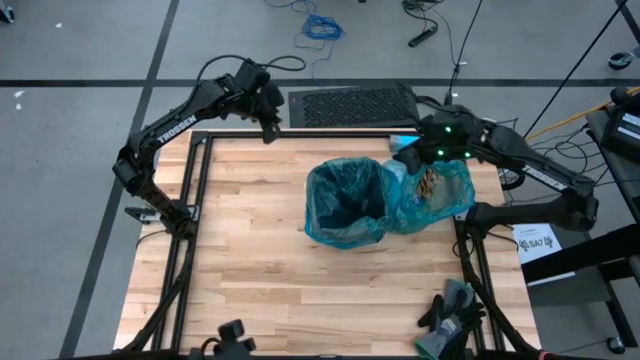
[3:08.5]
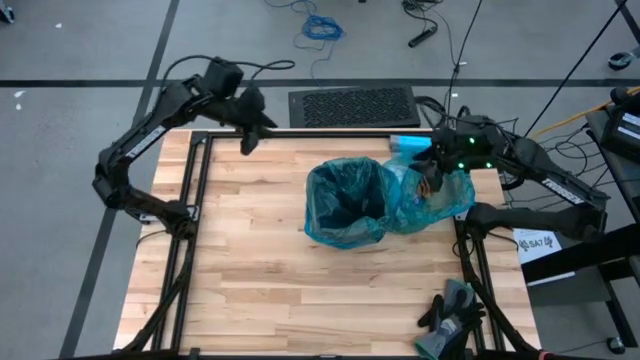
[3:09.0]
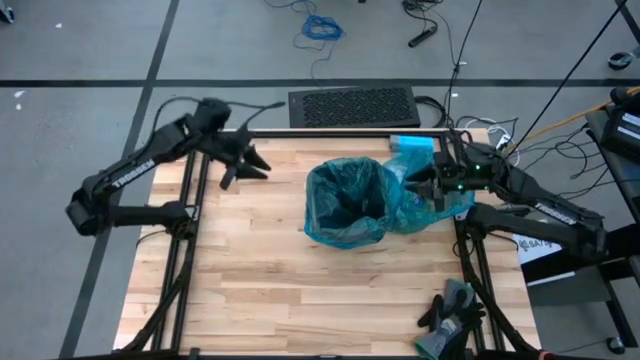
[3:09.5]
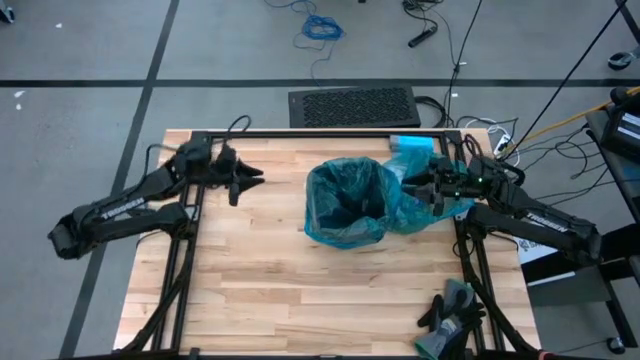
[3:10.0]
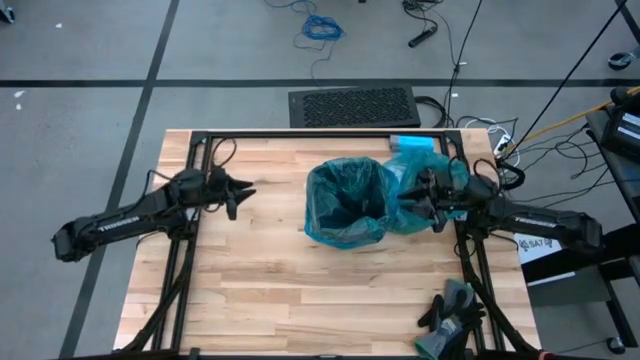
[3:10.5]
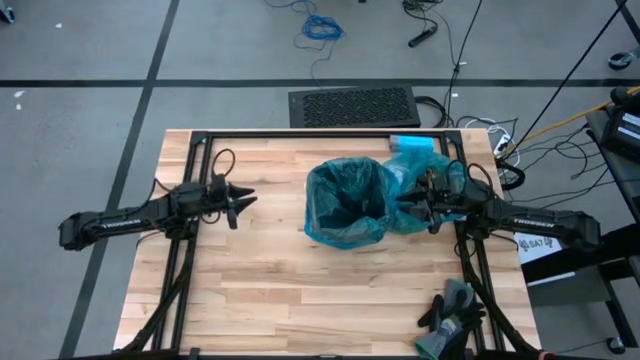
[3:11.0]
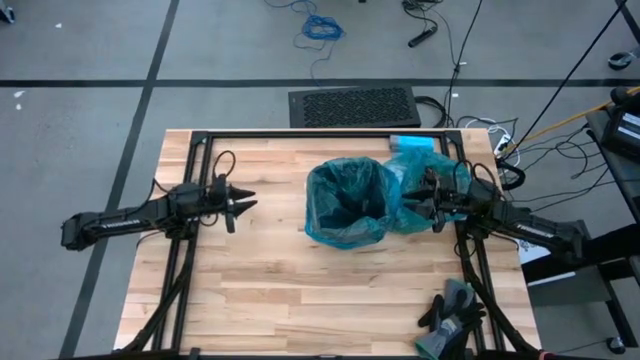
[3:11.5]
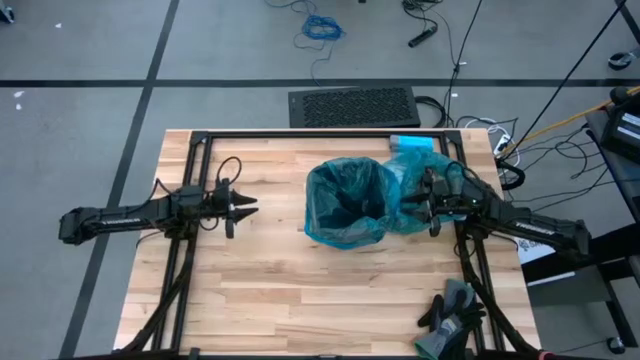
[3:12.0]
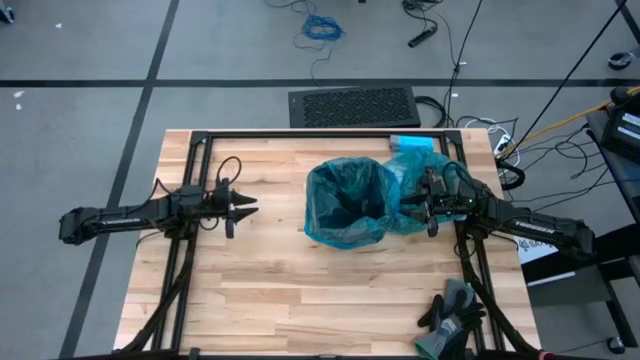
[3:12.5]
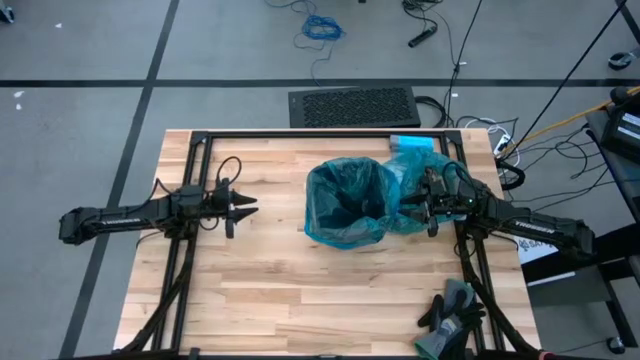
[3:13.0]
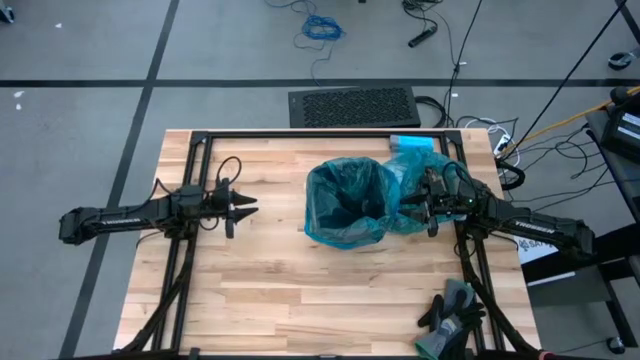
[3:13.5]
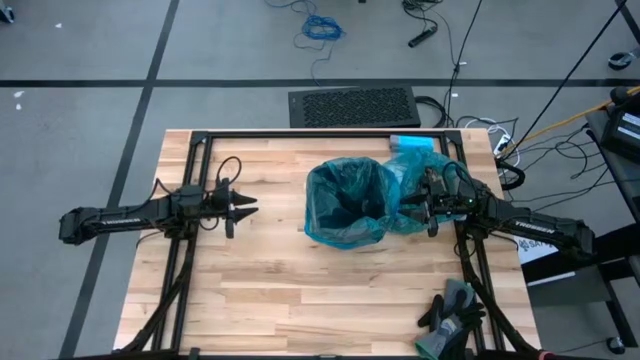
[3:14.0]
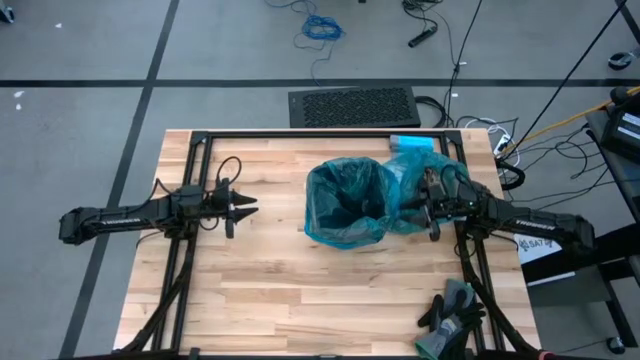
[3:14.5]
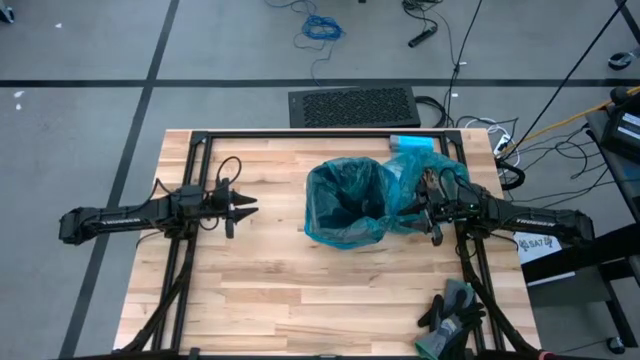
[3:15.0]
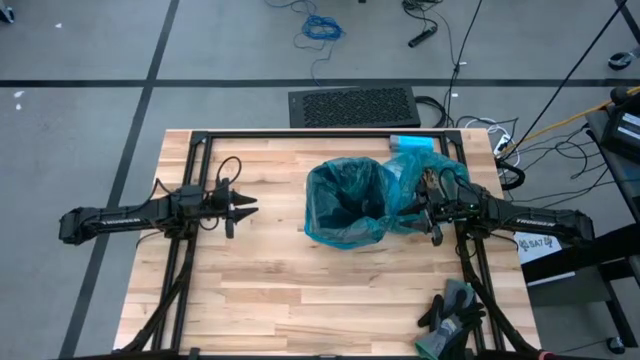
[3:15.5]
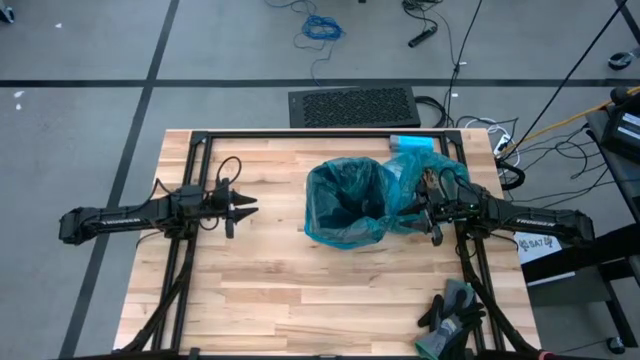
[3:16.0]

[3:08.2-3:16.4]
Task: place trash/remove bag and relplace
Return to Home Position

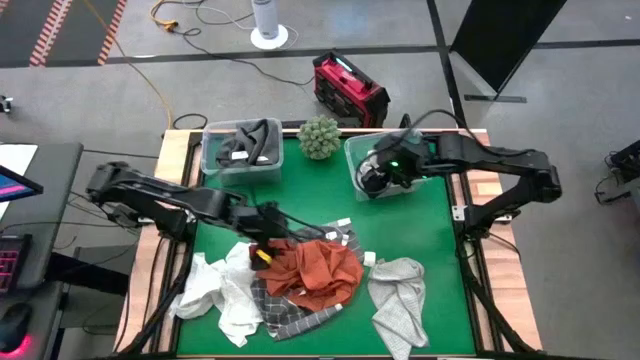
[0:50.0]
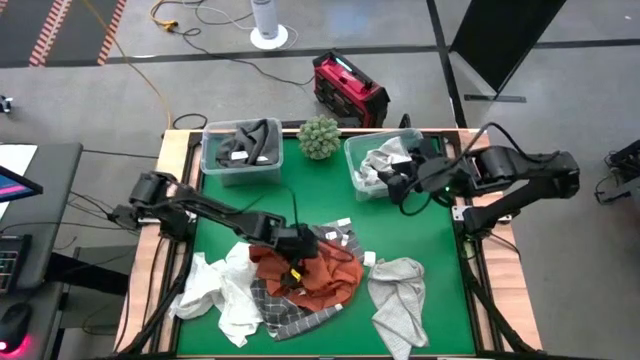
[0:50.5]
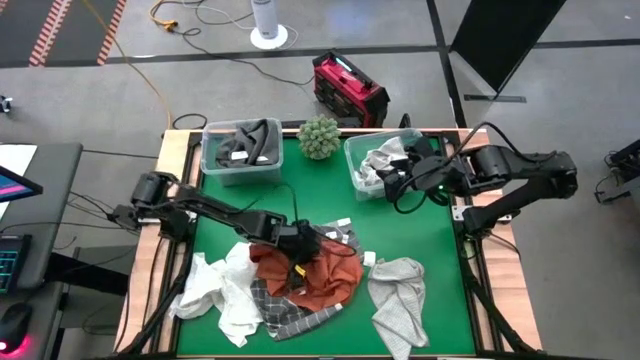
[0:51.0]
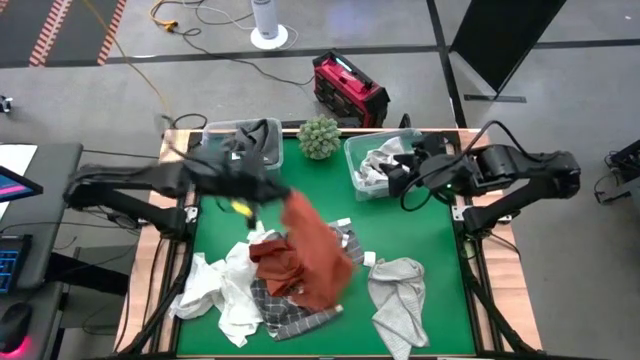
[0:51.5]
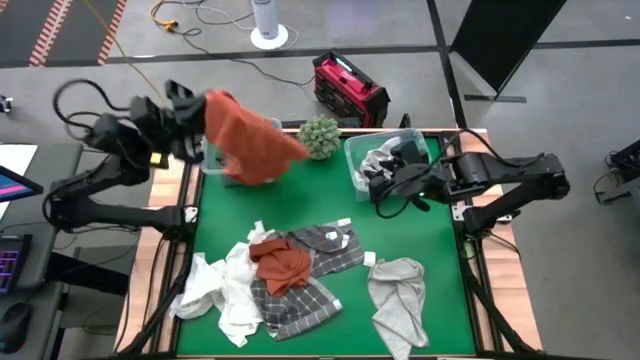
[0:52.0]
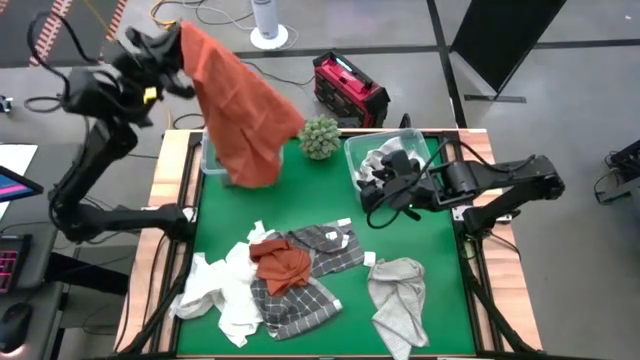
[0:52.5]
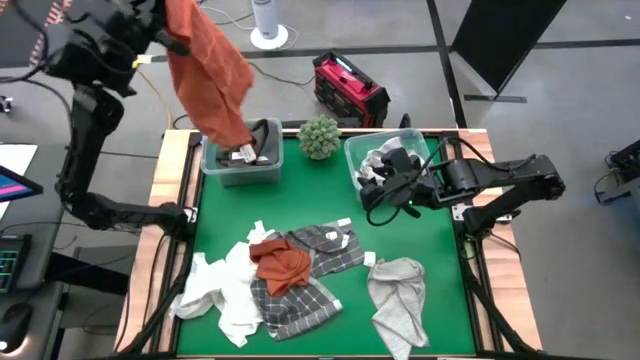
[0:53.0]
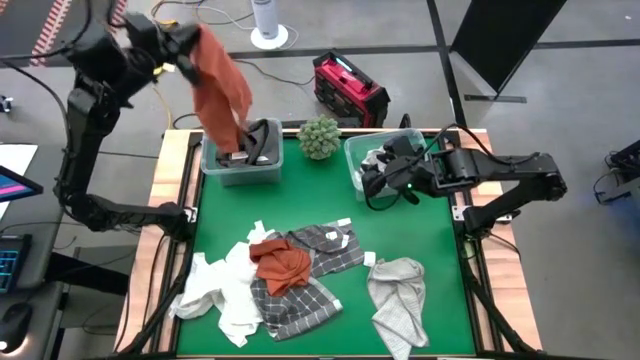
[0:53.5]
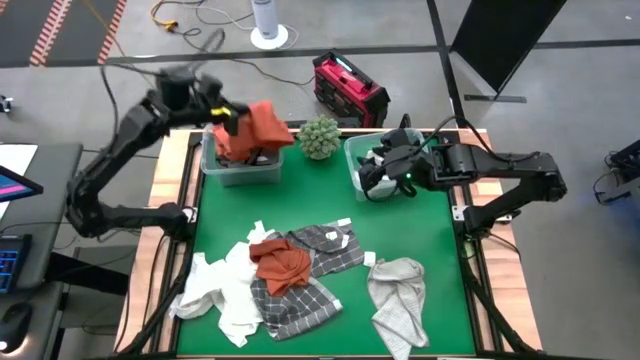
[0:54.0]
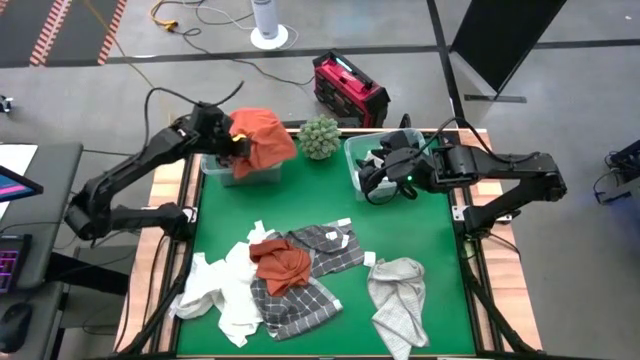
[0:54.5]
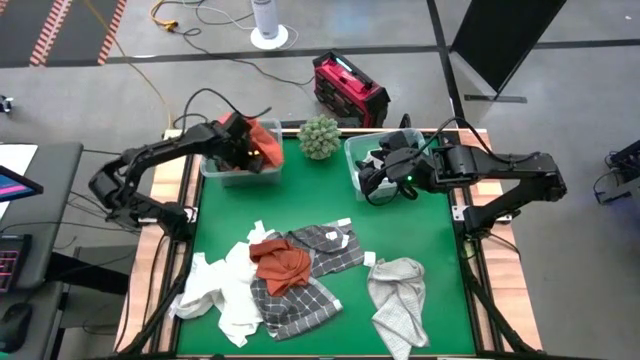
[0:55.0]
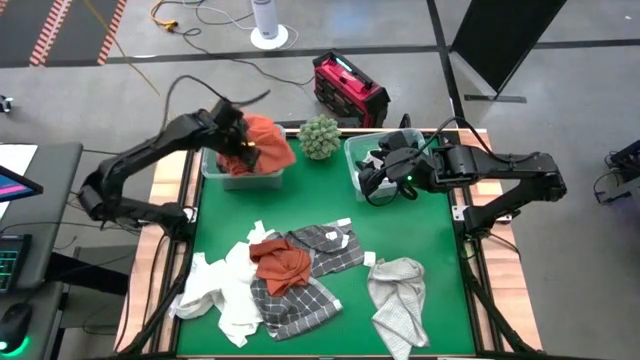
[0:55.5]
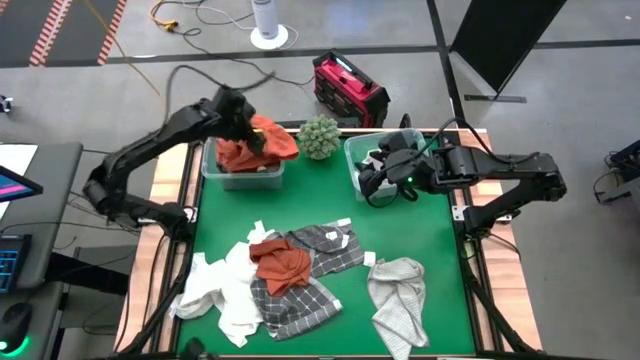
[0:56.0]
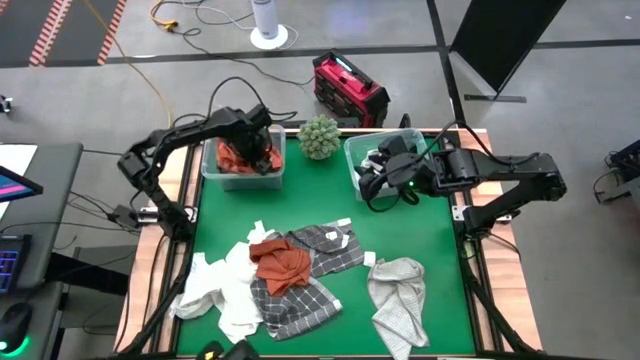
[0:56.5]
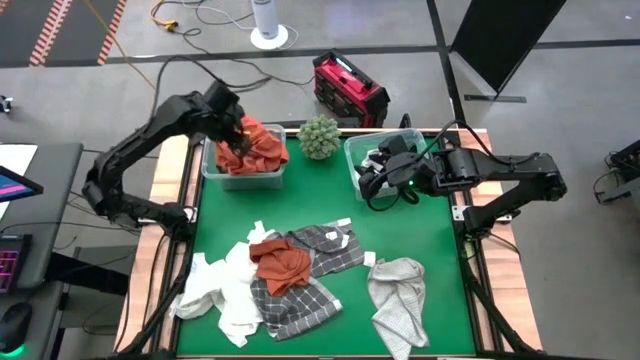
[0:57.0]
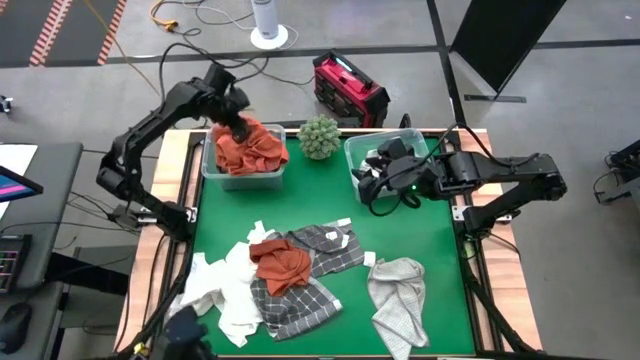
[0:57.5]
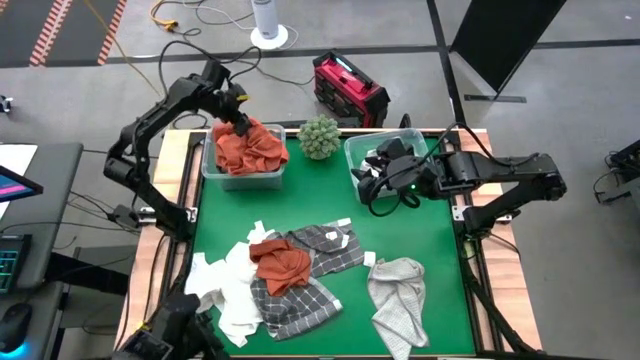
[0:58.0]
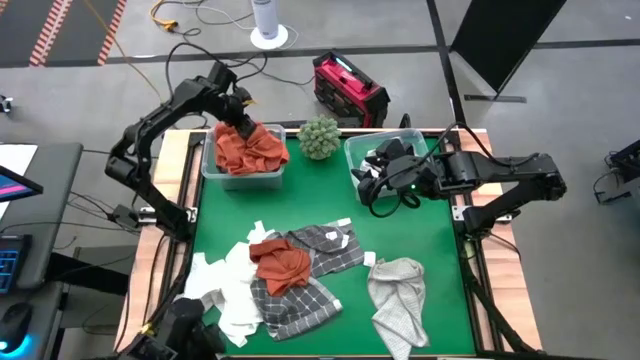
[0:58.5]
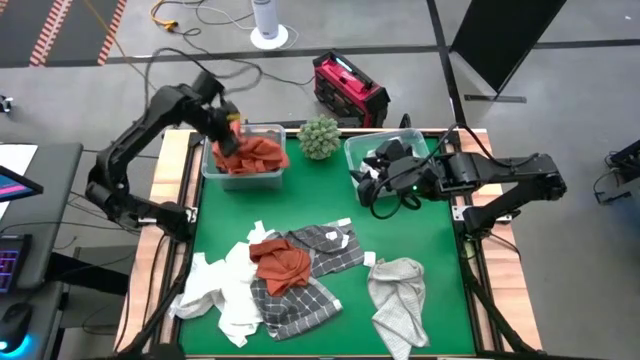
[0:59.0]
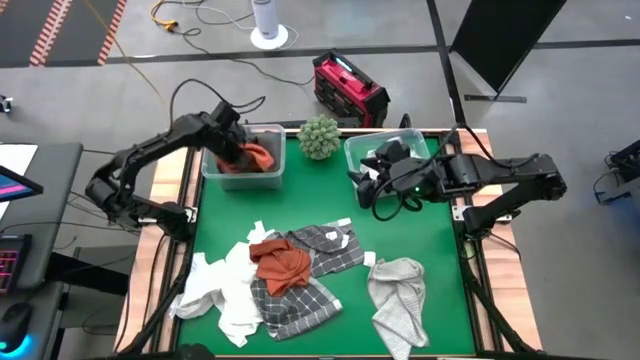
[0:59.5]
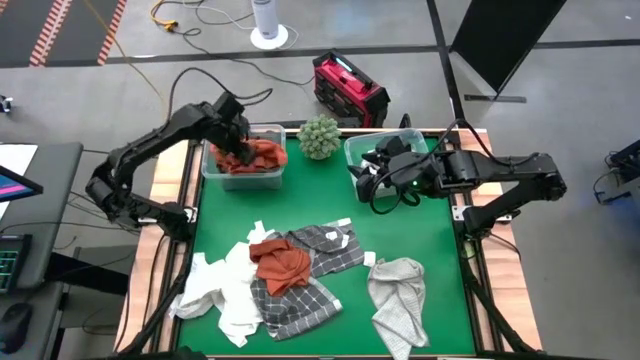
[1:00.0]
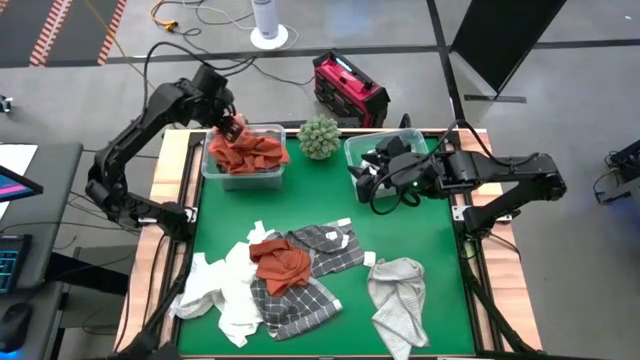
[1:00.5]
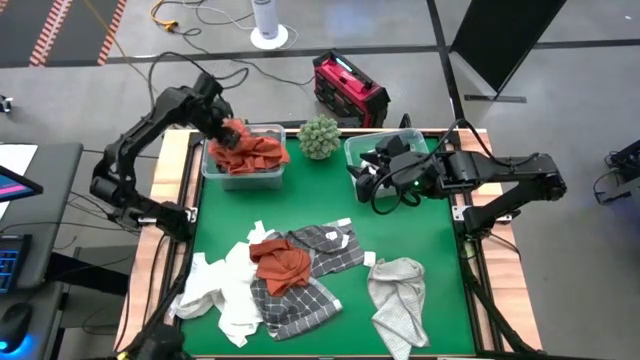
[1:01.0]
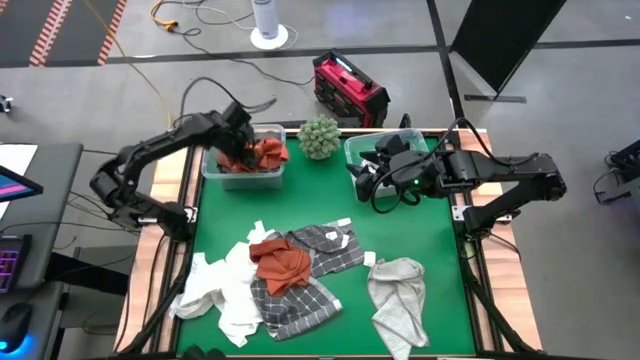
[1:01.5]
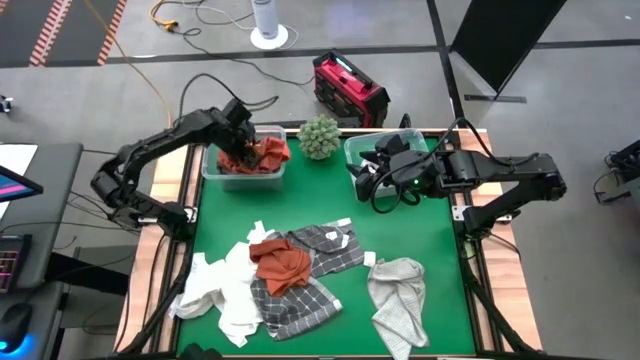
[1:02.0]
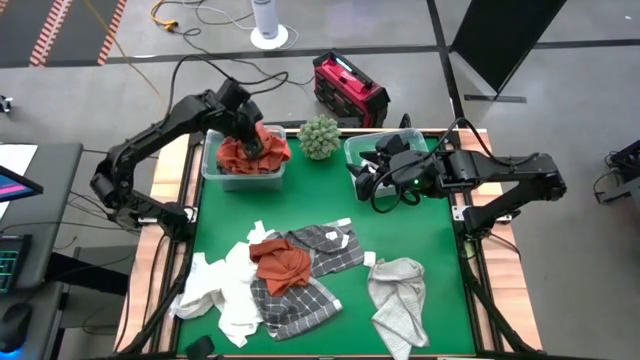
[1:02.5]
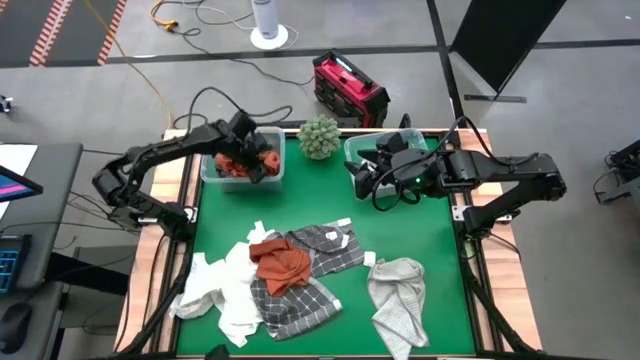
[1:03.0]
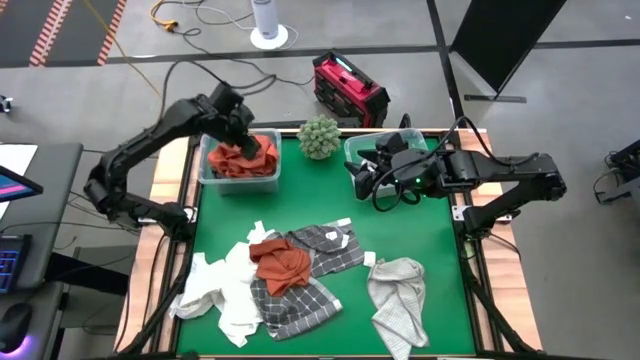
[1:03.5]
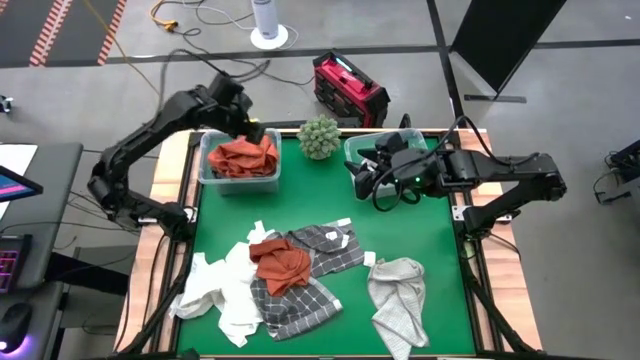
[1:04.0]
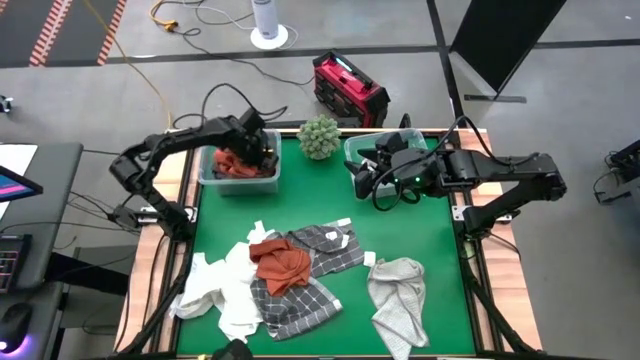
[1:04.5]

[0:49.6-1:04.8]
Task: Sort towels by color in basket
Put the orange towel into the left transparent bin
